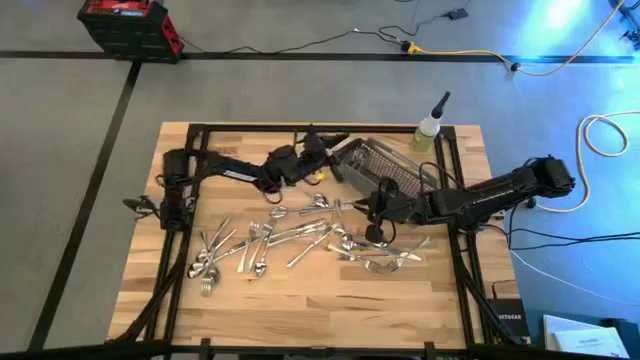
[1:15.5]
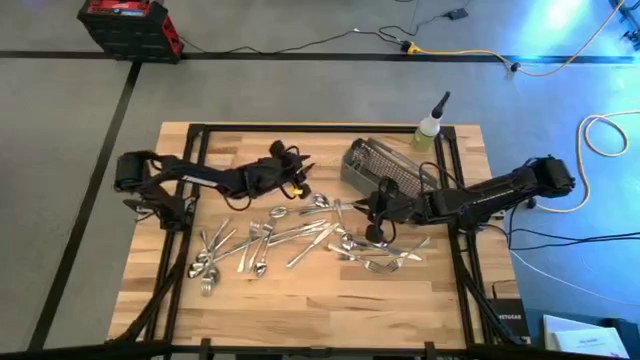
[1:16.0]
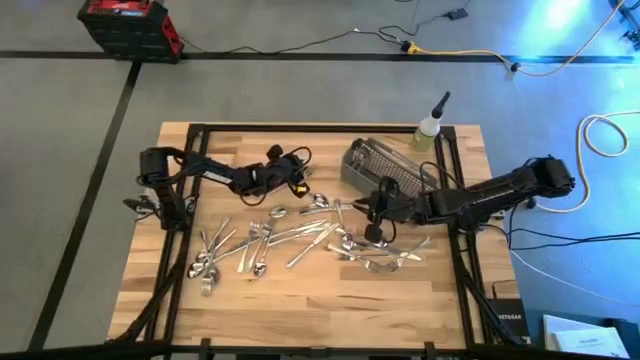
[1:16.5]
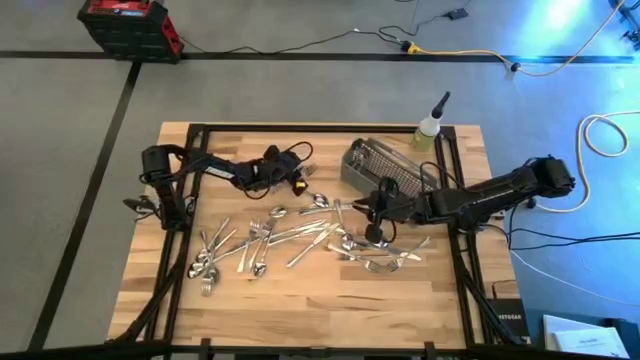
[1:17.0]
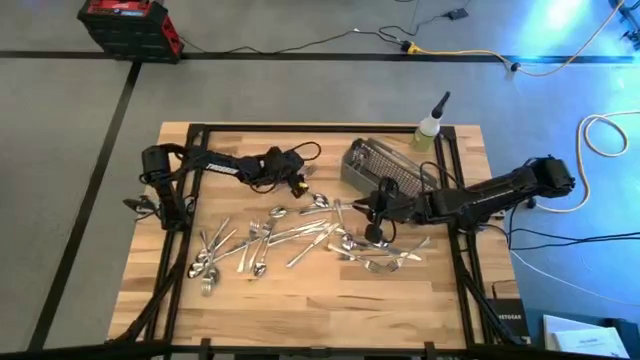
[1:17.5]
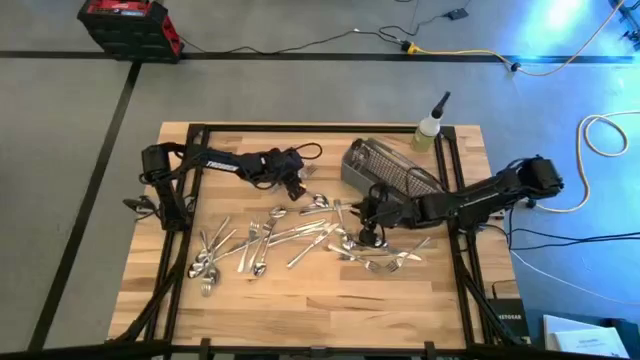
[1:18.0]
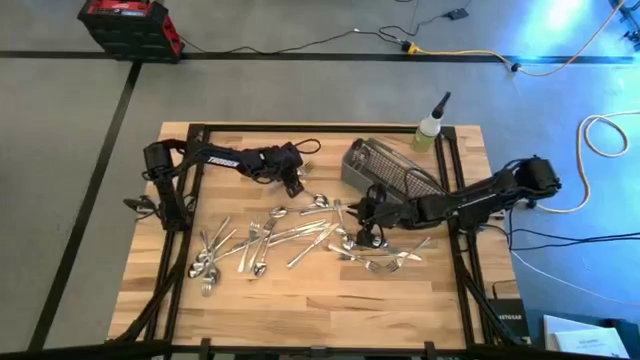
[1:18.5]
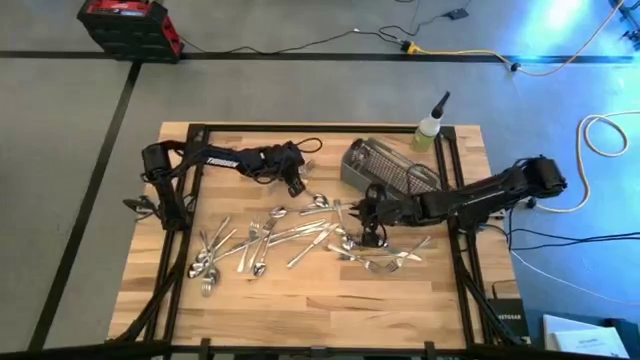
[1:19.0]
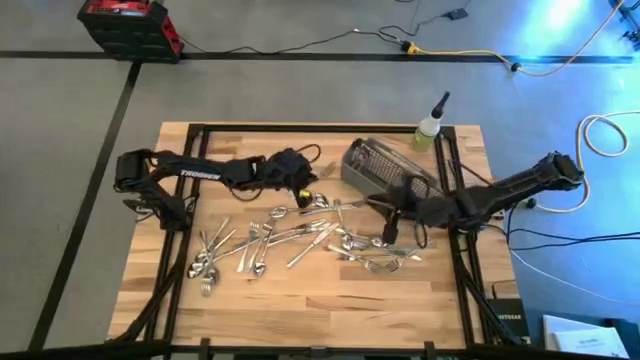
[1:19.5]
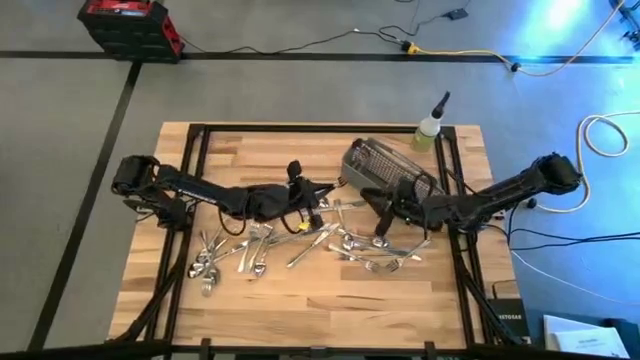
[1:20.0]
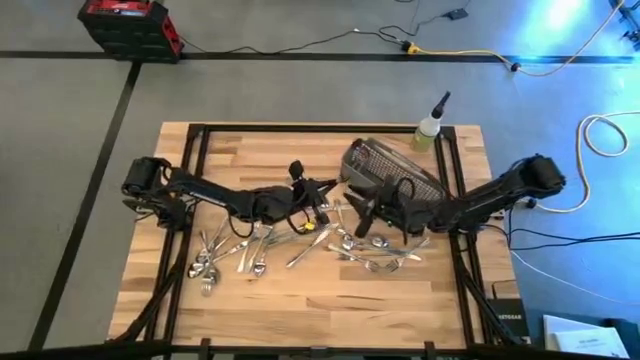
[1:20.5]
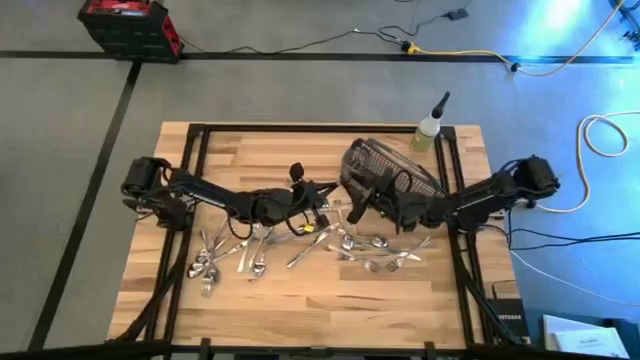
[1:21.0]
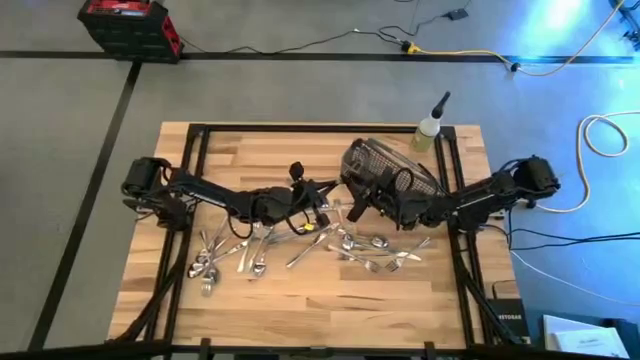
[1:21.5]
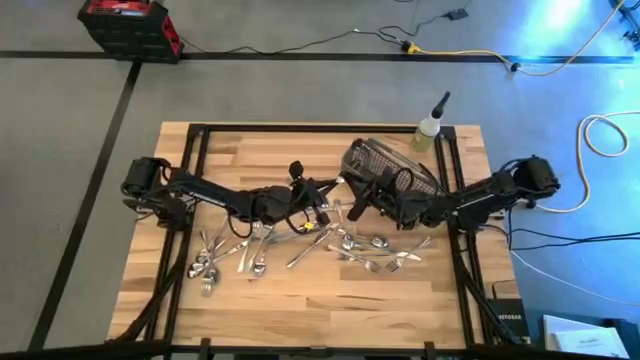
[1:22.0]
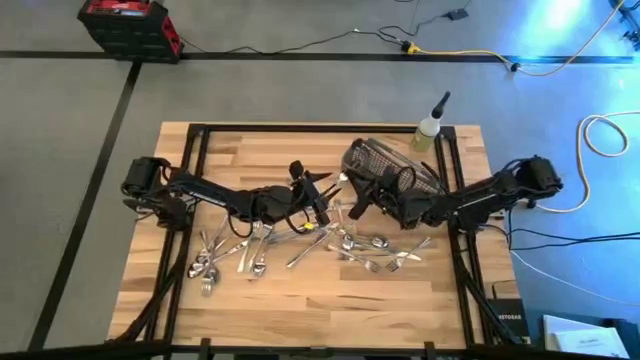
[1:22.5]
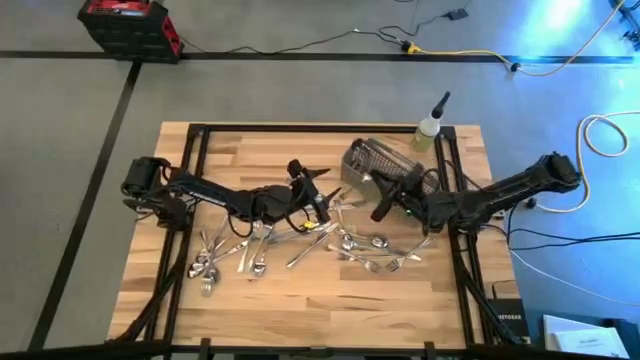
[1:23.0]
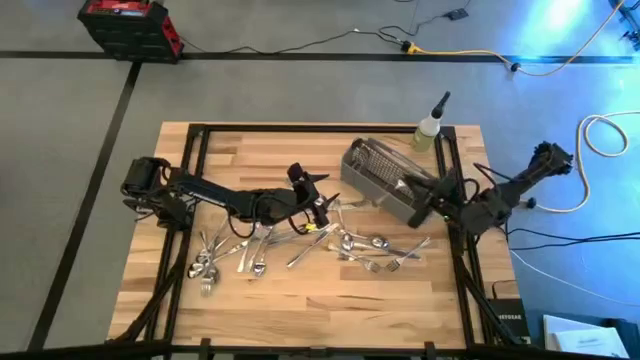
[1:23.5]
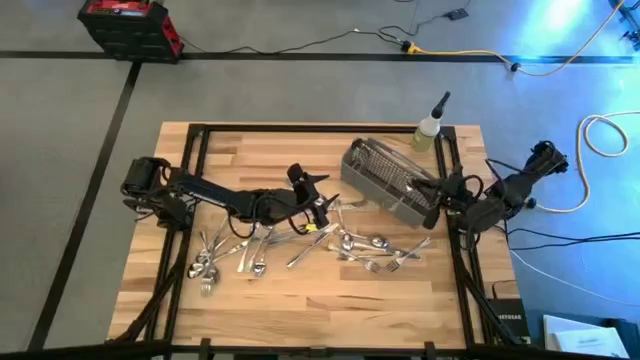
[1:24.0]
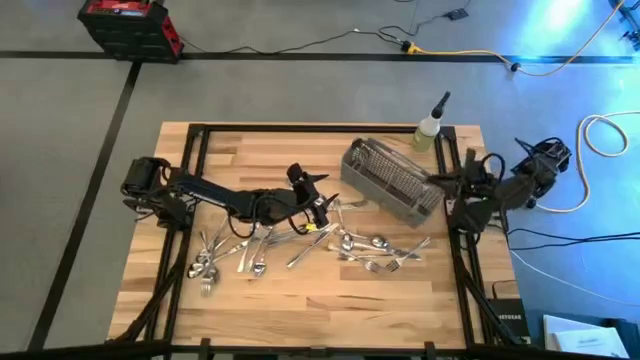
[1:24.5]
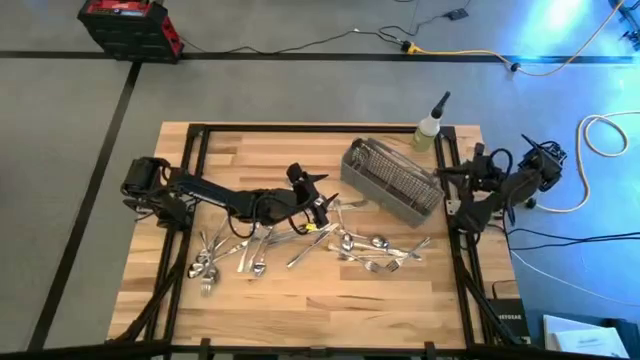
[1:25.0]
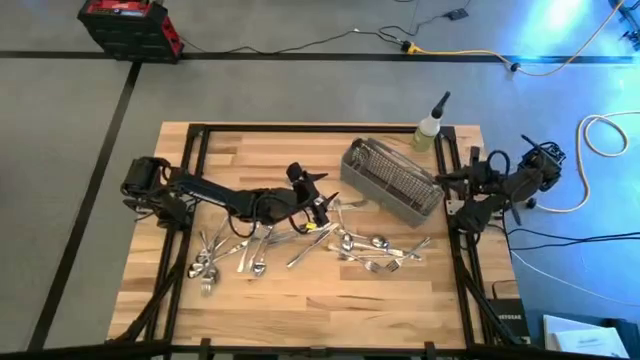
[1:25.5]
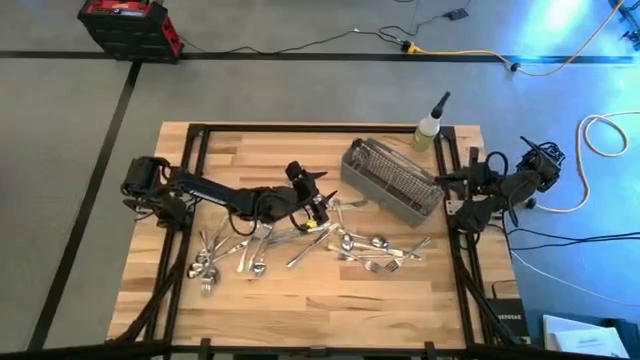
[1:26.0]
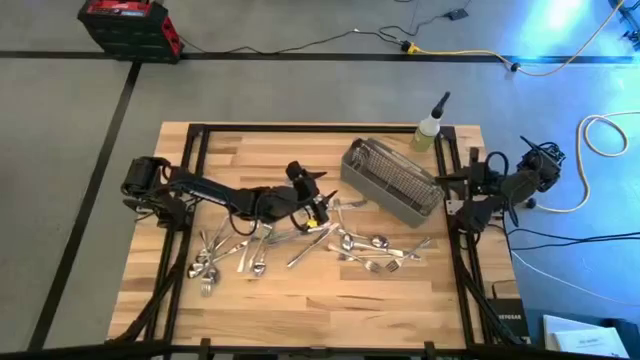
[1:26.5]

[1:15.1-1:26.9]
Task: Sort silverware
Put the silver fork into the gray silverware organizer

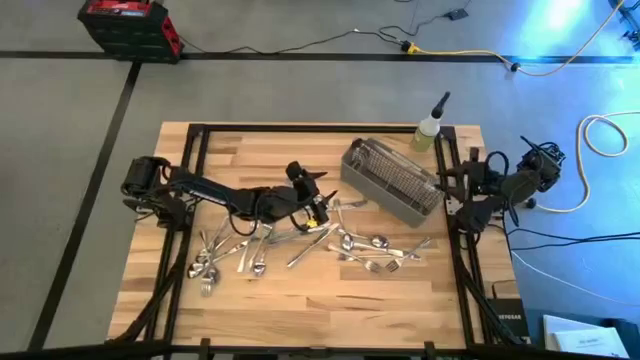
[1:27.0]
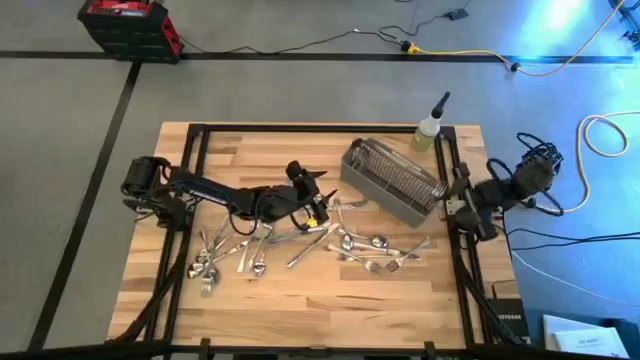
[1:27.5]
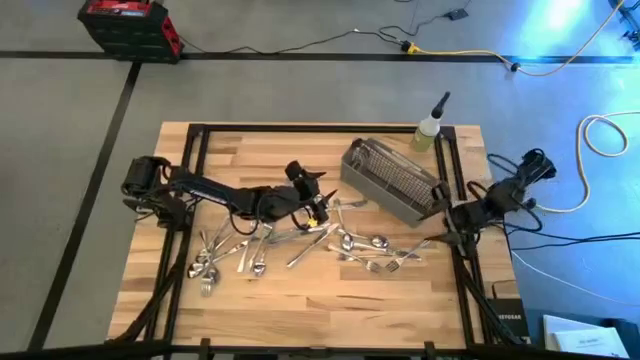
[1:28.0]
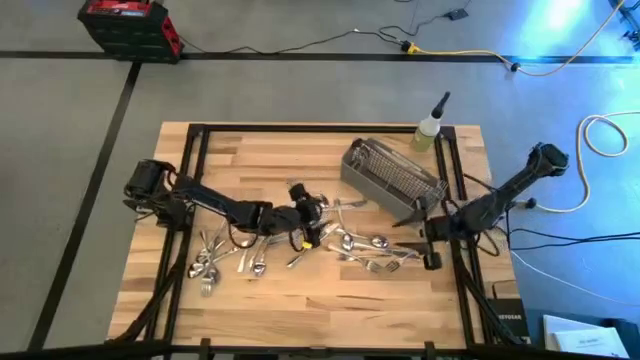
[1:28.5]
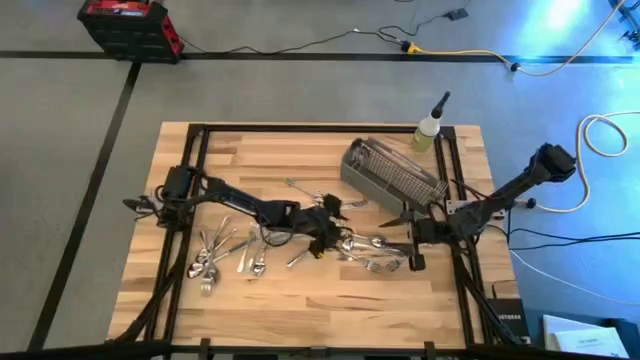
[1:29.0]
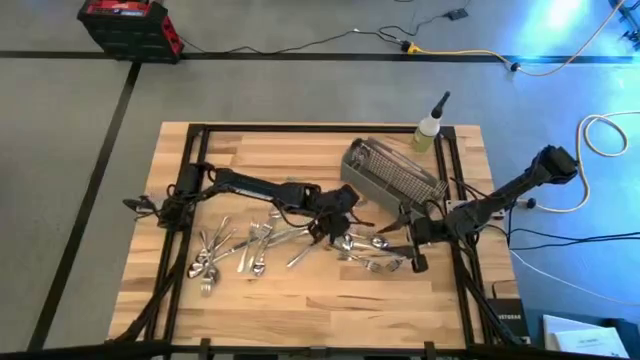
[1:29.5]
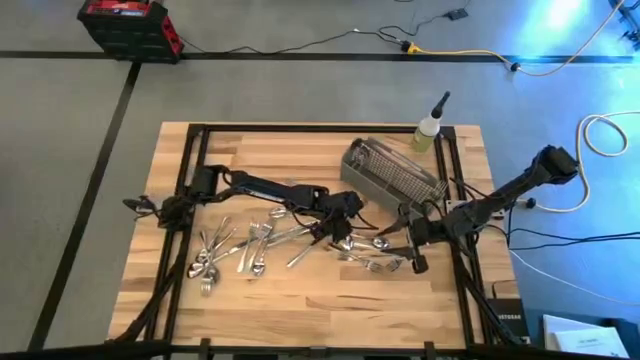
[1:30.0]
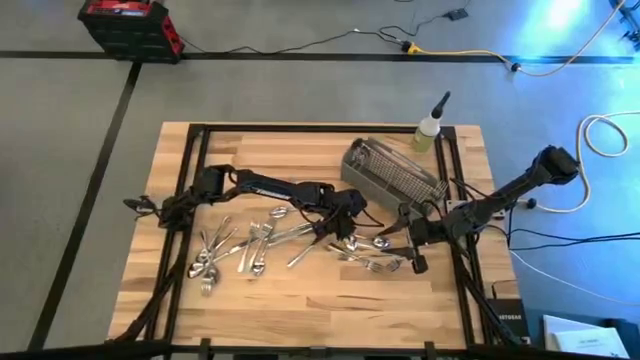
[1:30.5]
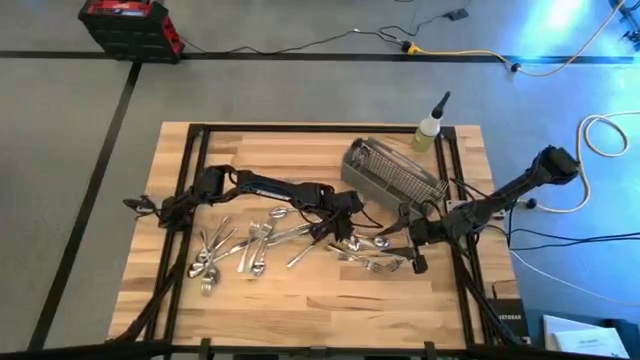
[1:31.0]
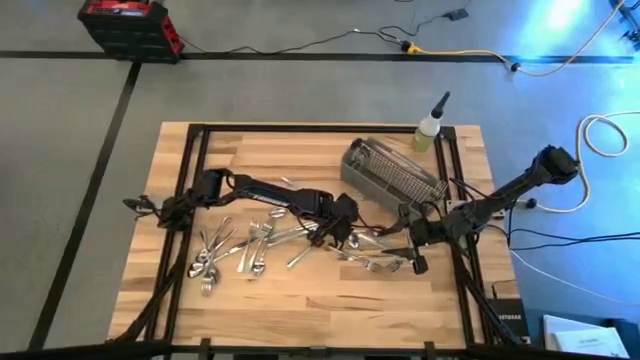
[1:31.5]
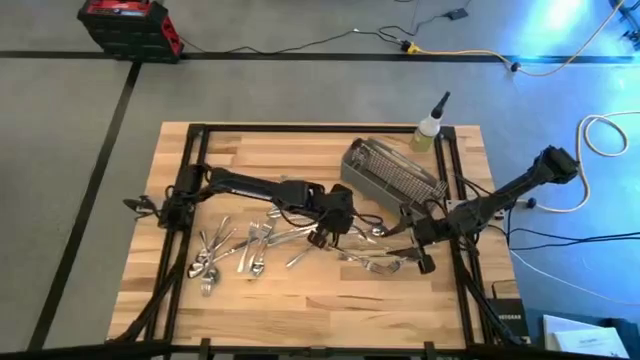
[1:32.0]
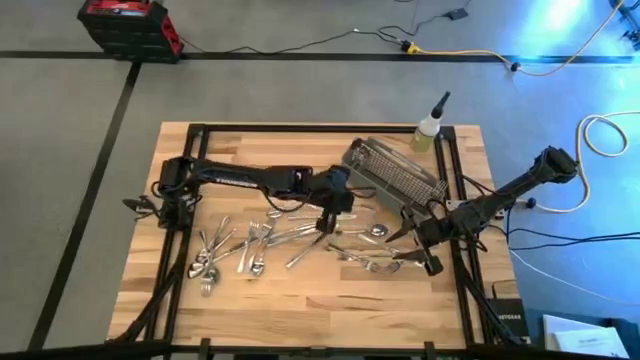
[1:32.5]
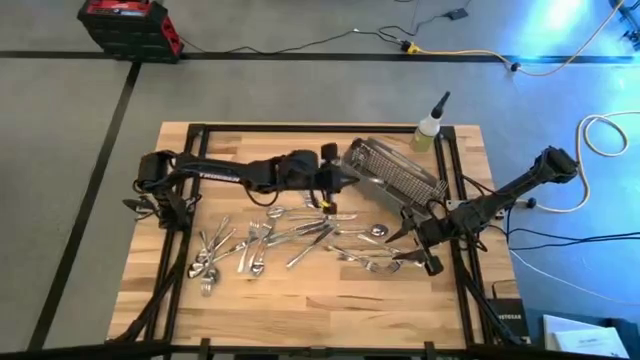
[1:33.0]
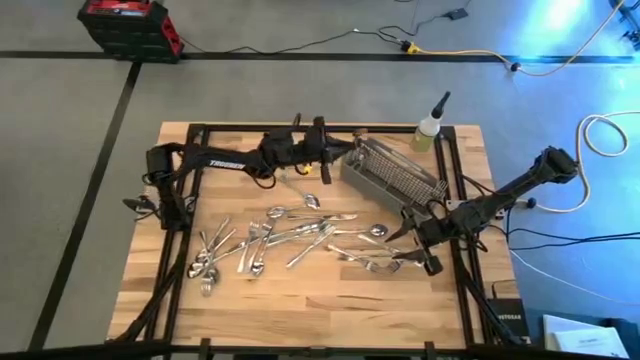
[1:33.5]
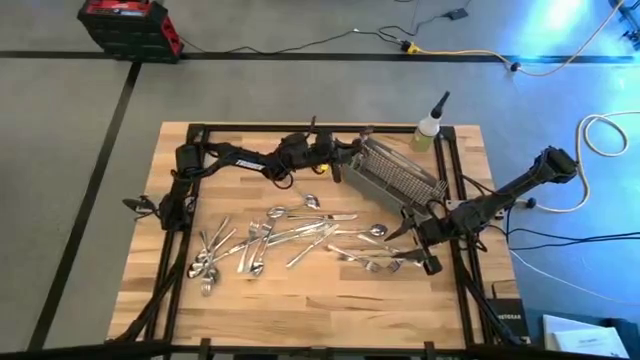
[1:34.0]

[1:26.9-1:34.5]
Put the silver spoon into the gray silverware organizer

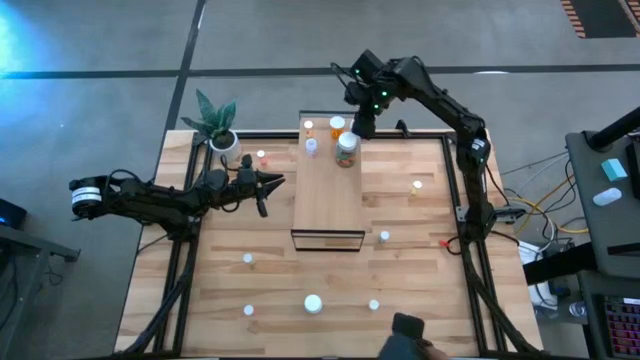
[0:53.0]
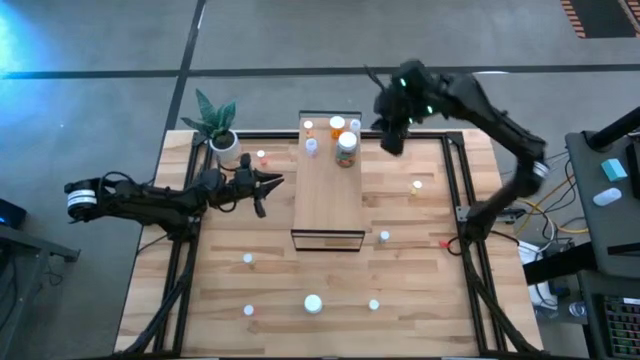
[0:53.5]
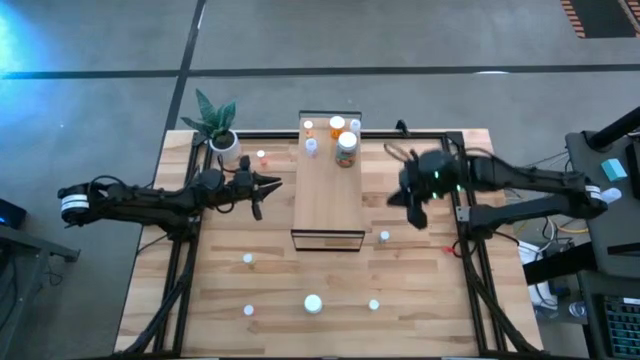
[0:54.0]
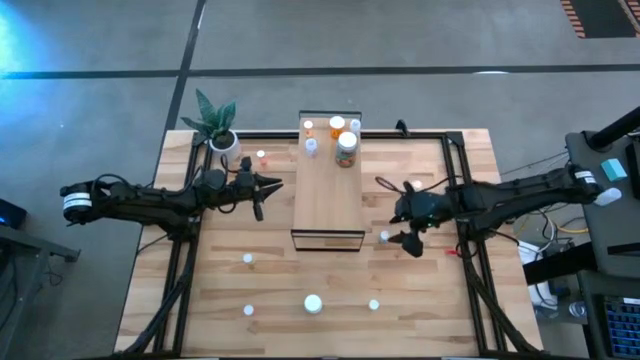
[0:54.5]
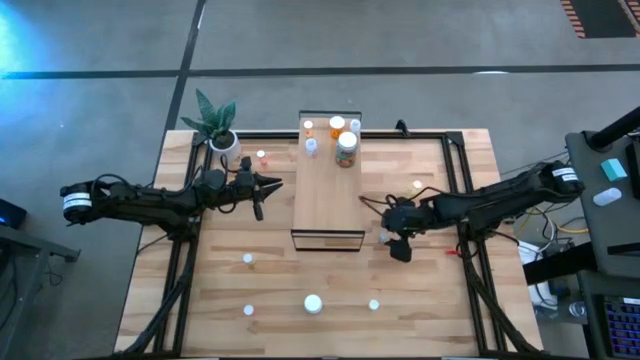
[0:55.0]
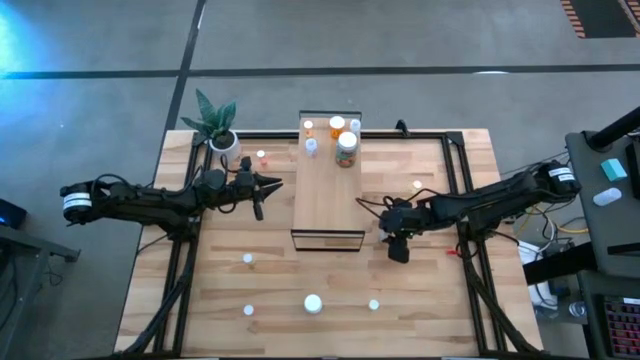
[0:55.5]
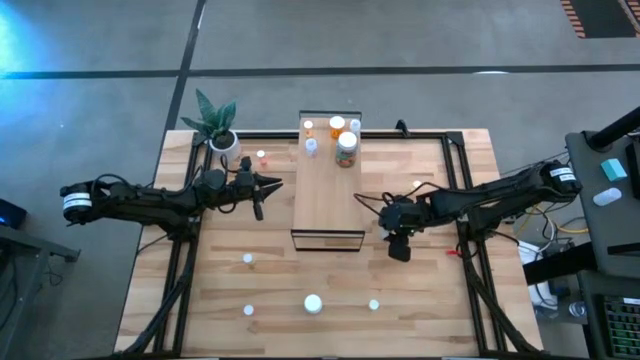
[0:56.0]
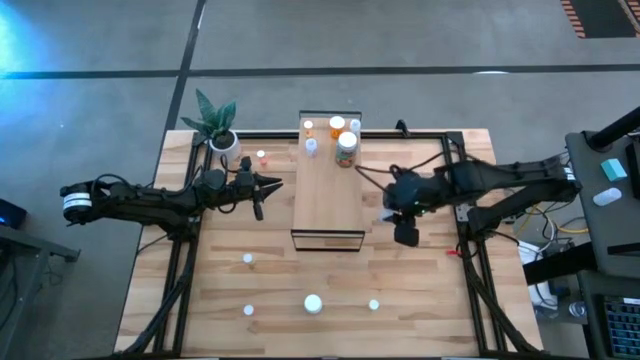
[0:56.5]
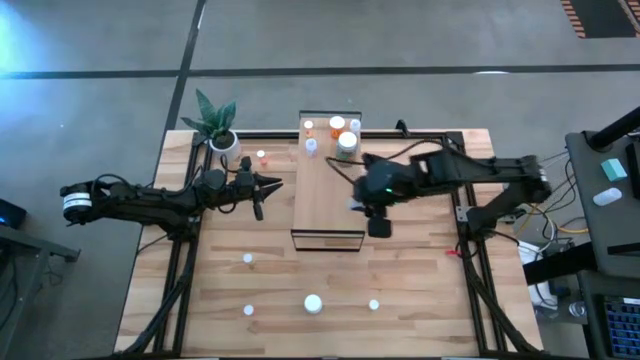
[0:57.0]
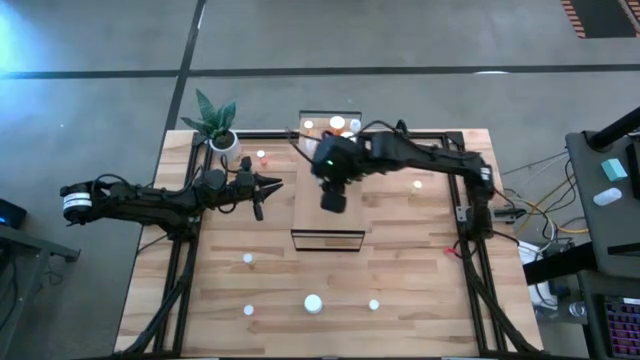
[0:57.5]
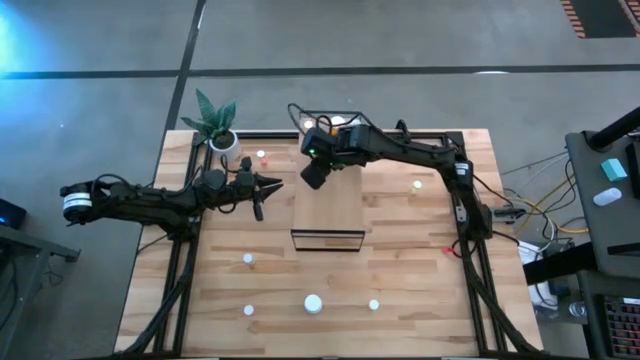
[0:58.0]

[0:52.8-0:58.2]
Task: Pick and place medicine bottles onto shelf by color
Put the blue pill bottle on the shelf
